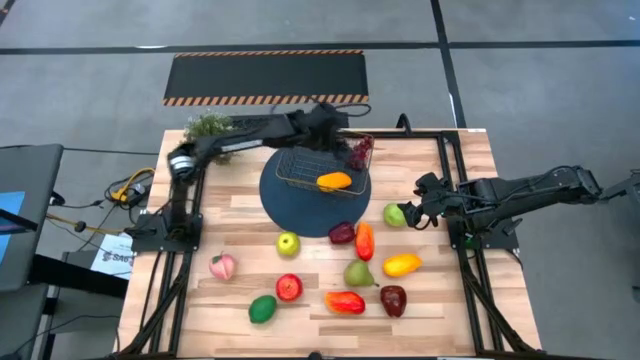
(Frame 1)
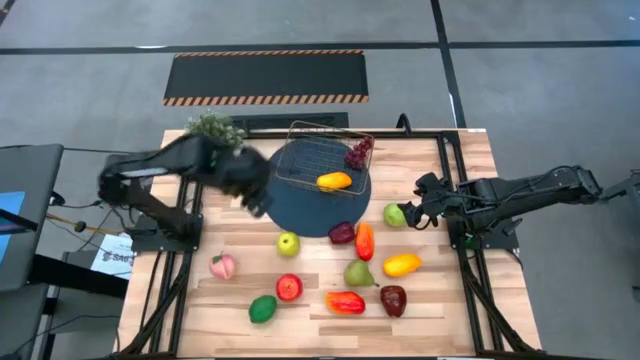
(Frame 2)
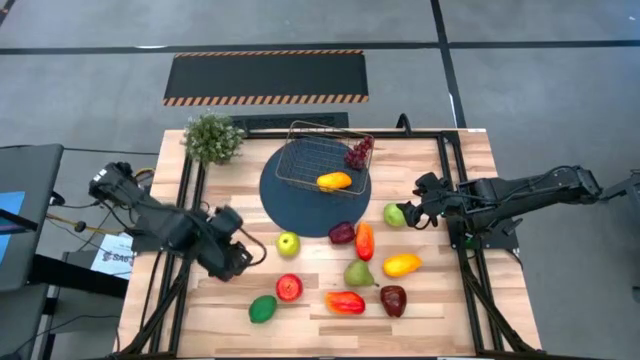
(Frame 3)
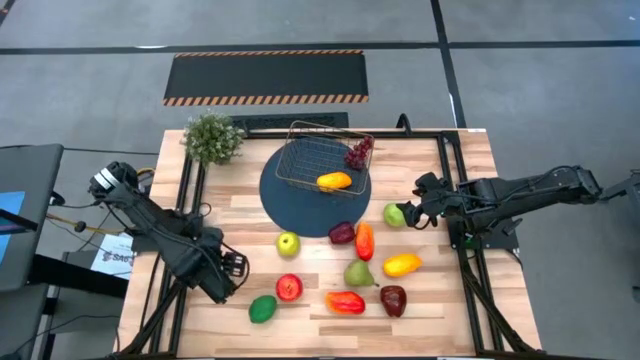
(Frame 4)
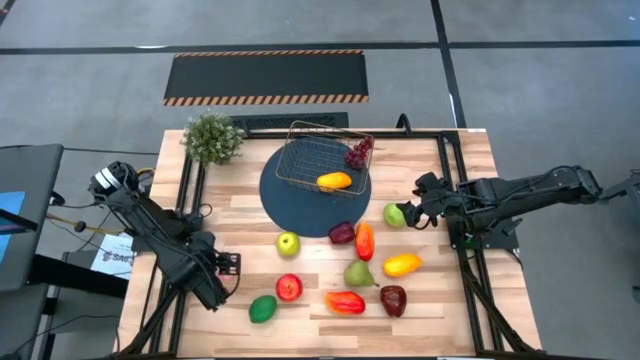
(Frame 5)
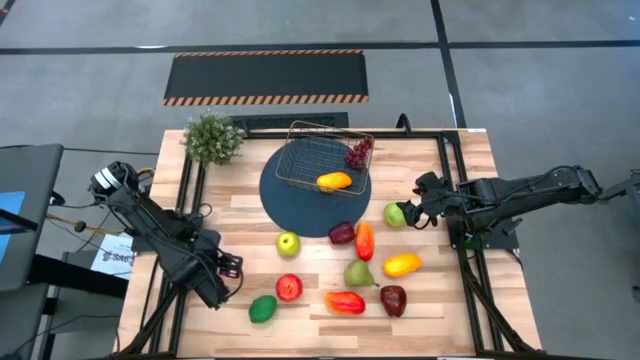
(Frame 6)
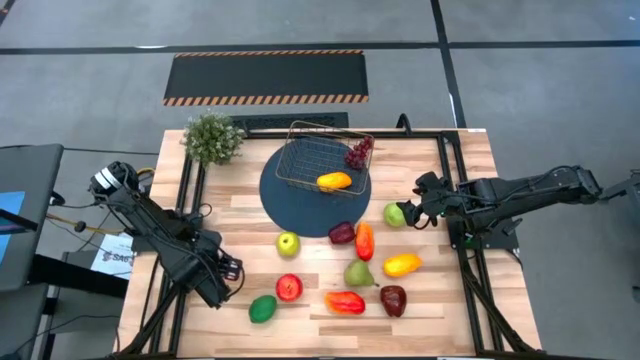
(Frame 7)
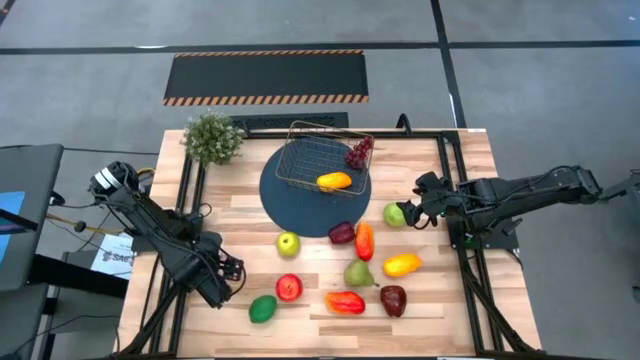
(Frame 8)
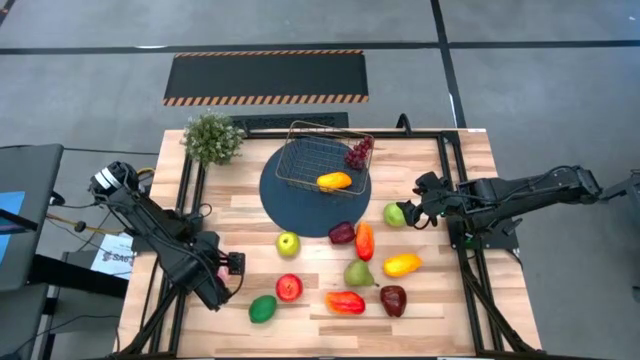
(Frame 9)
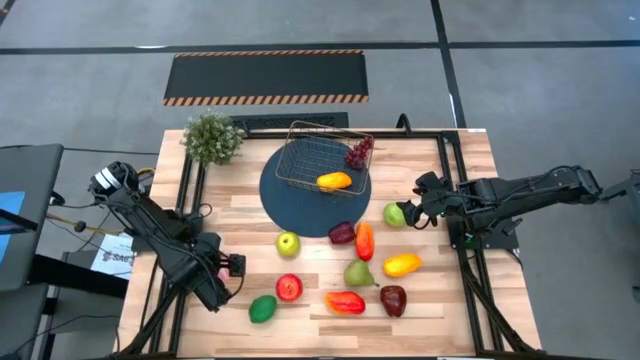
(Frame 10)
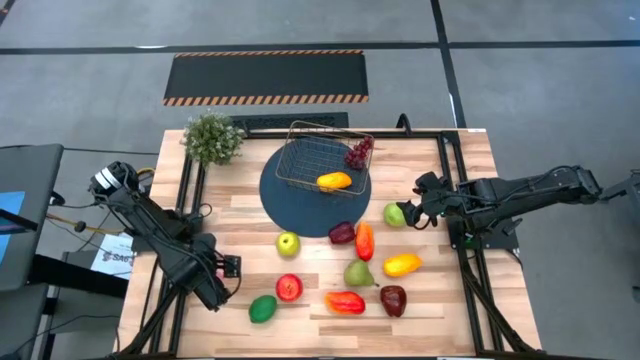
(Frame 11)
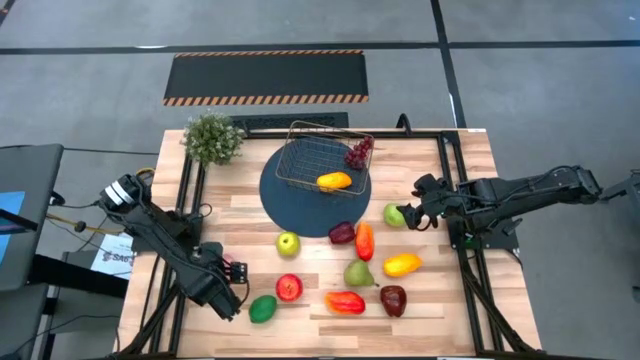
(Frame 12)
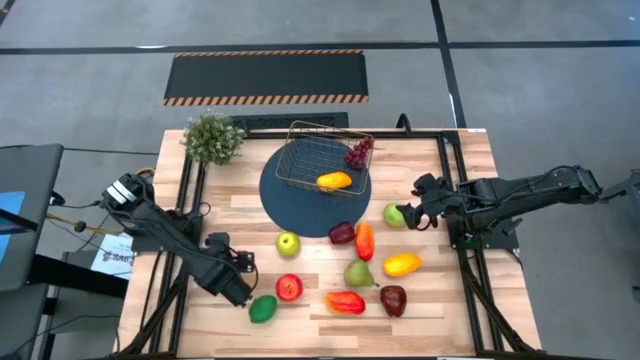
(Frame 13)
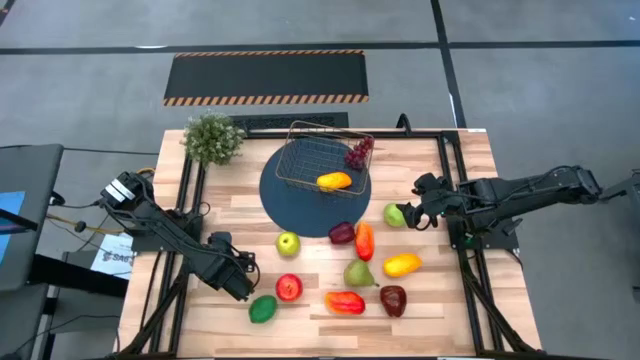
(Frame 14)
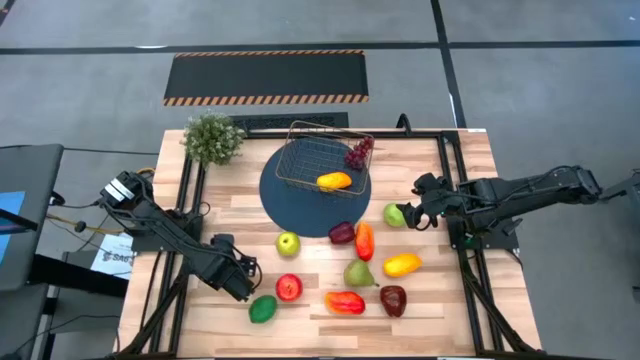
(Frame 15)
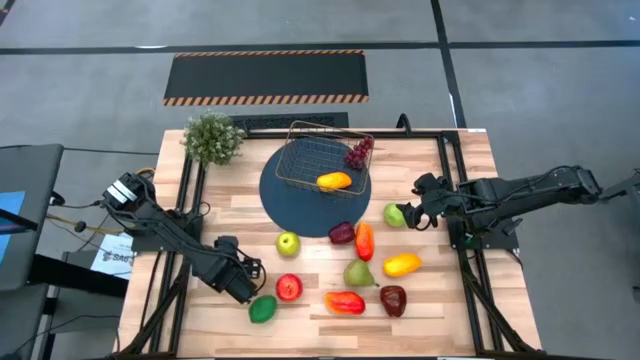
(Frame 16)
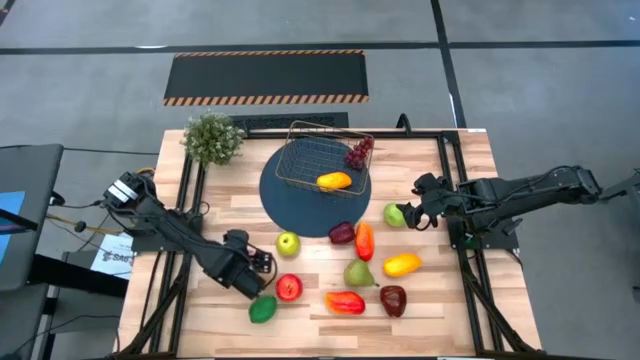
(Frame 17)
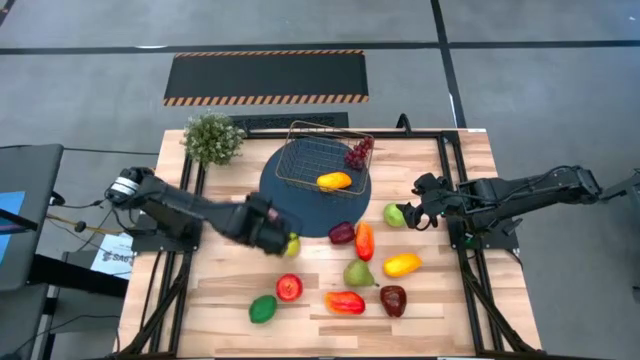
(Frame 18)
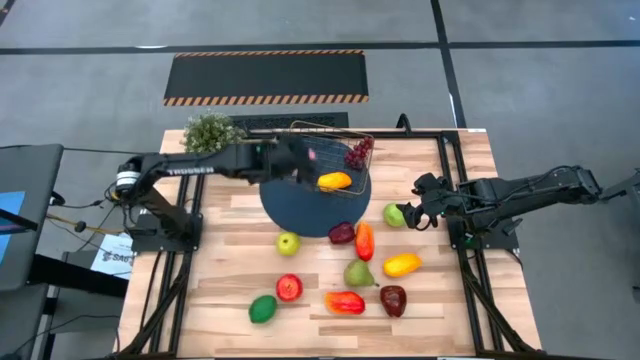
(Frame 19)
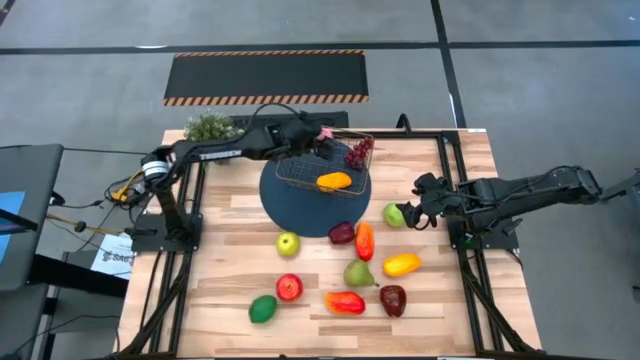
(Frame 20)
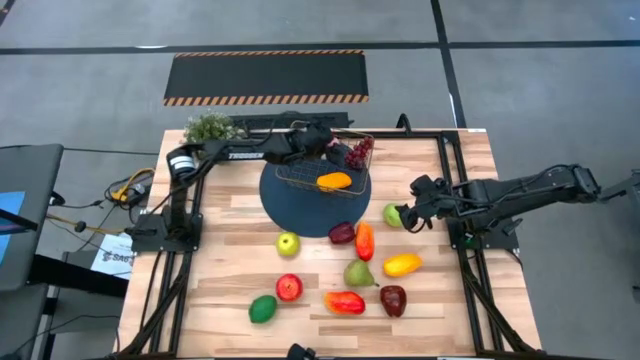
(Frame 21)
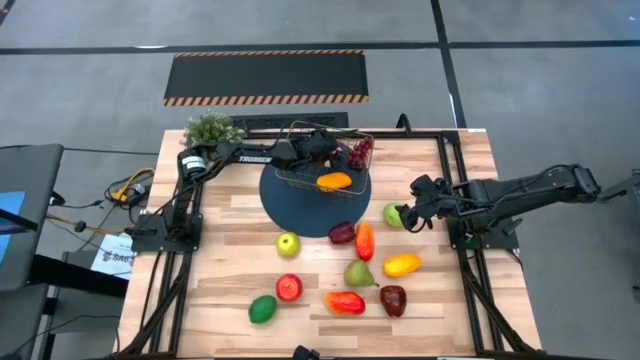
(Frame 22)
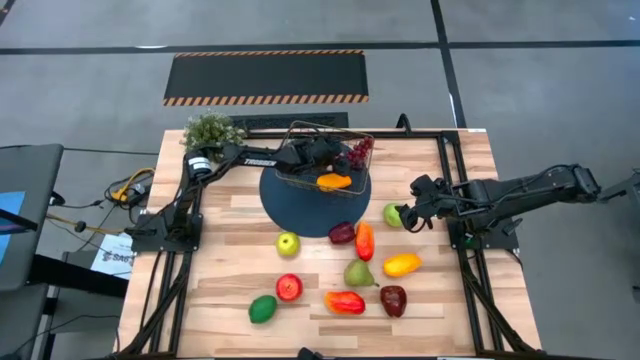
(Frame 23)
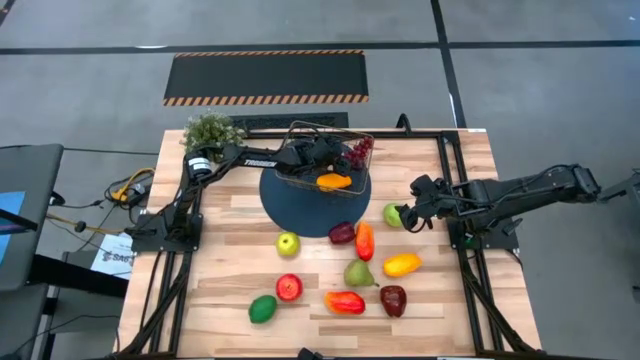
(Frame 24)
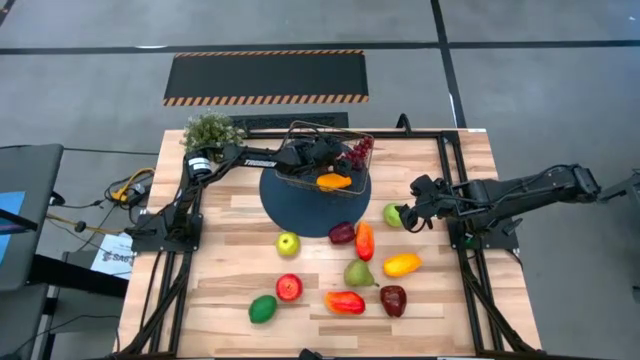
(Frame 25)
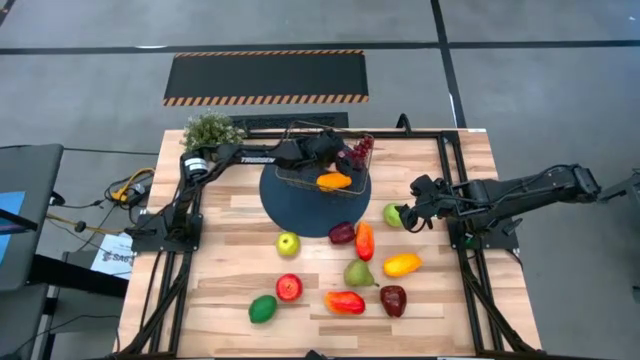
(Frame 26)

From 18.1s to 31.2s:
Task: Build produce basket
Put the peach into the wire basket

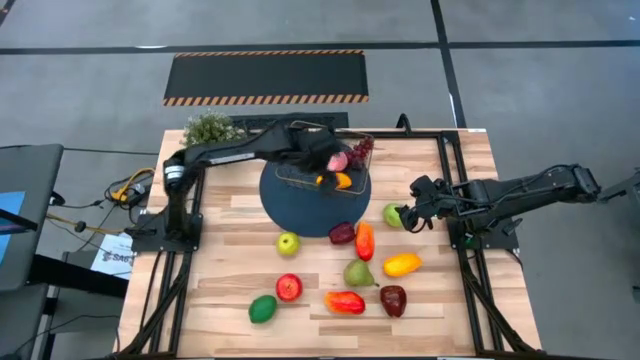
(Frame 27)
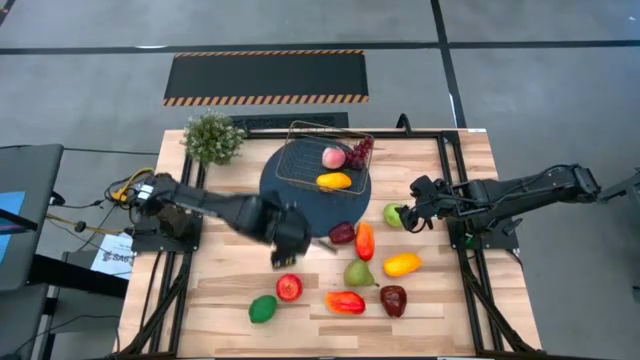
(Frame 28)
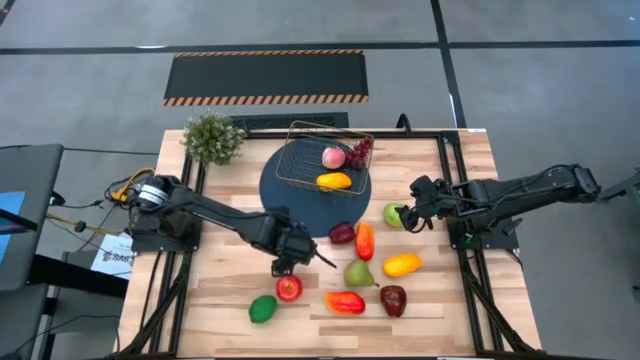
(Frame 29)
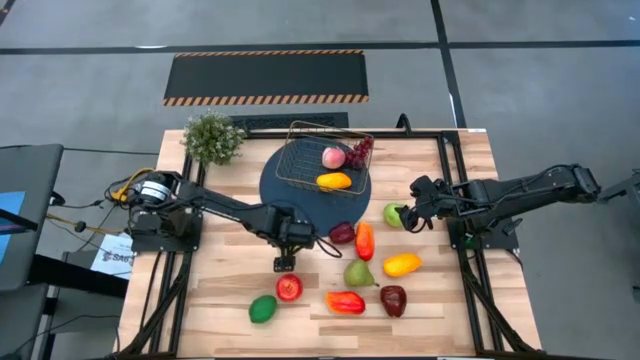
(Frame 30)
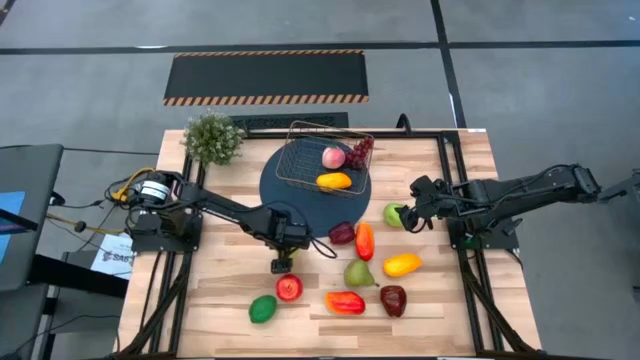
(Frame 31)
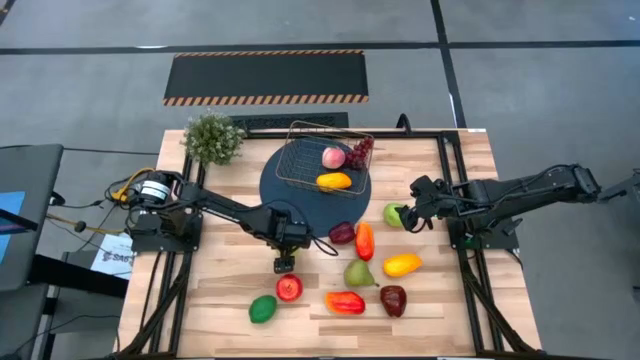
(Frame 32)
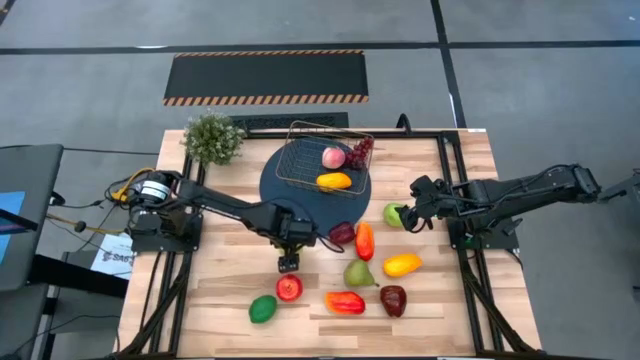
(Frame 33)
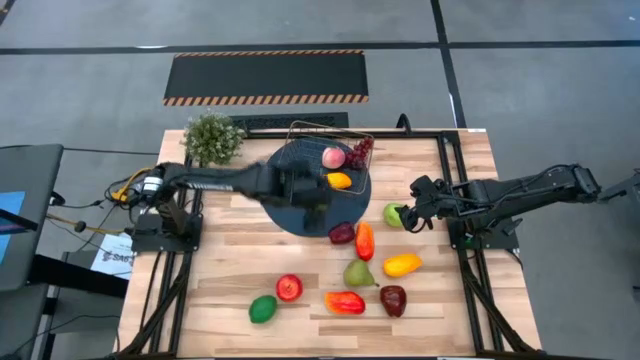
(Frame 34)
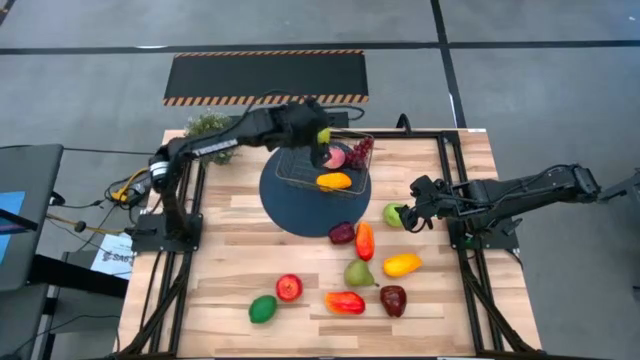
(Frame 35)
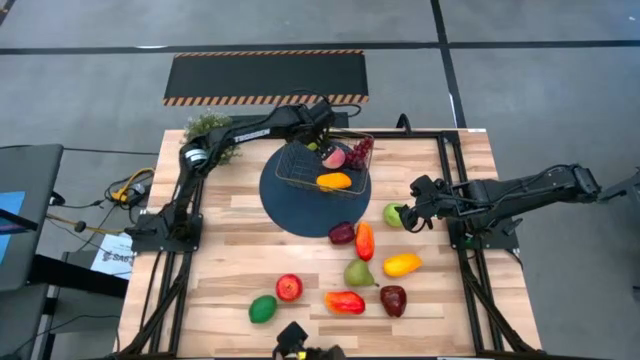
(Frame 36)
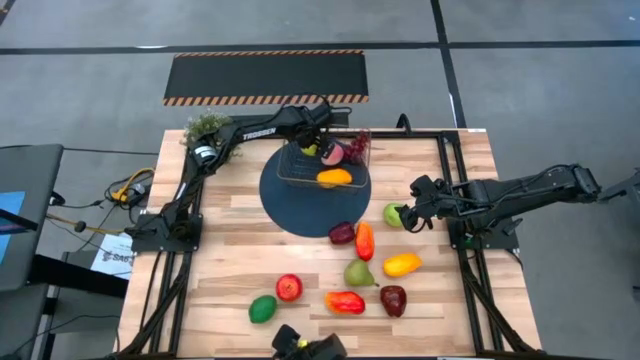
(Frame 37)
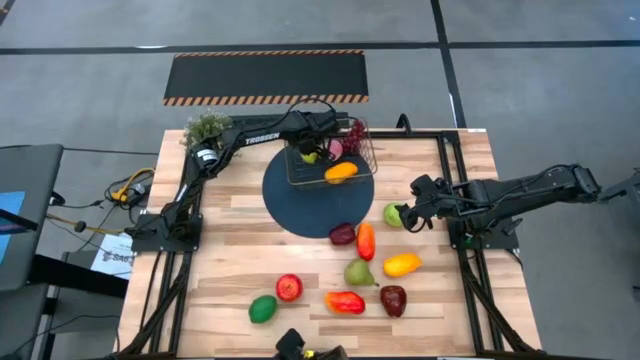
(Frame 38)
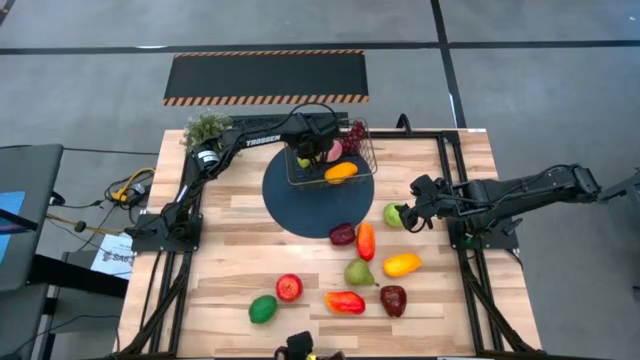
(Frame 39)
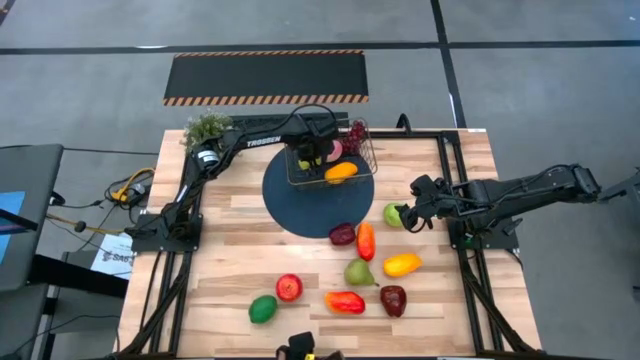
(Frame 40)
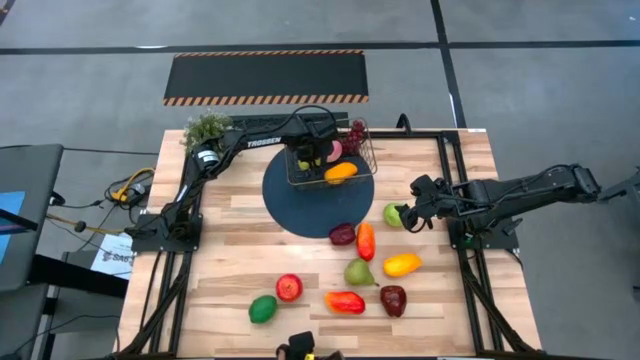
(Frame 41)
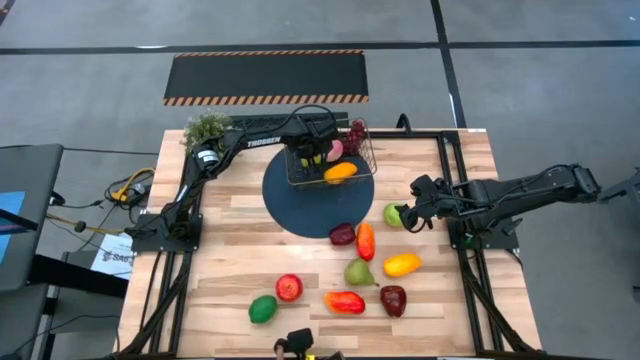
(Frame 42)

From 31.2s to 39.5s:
Put the green apple into the wire basket
